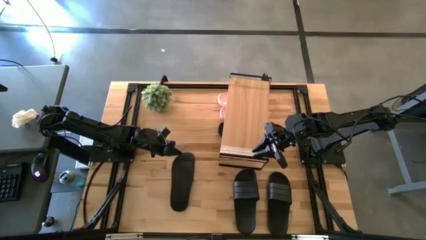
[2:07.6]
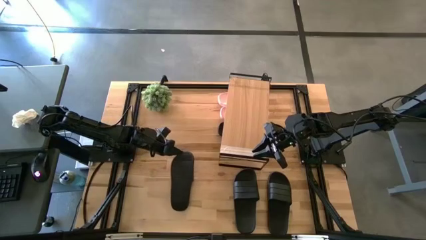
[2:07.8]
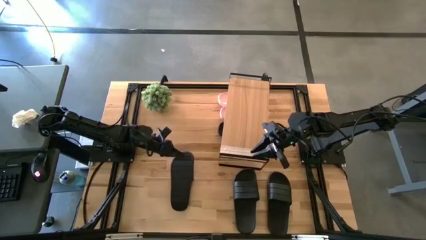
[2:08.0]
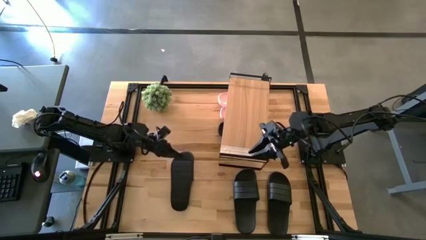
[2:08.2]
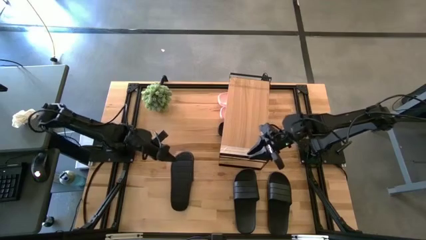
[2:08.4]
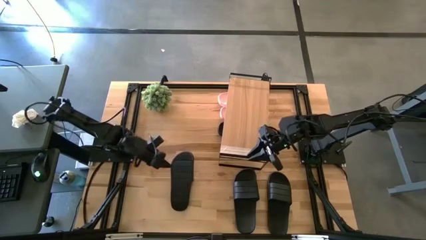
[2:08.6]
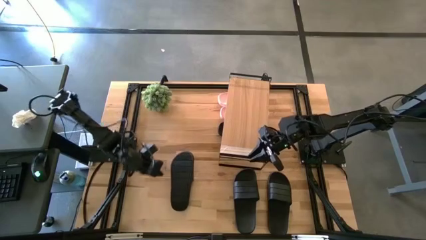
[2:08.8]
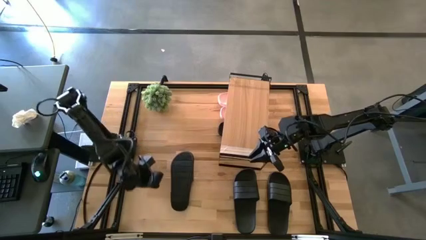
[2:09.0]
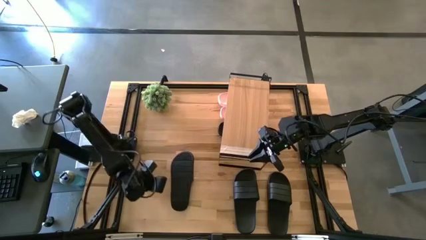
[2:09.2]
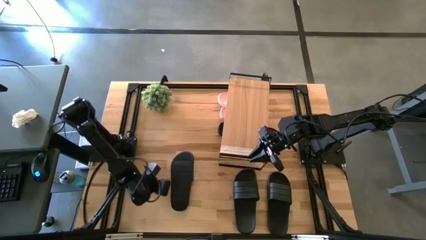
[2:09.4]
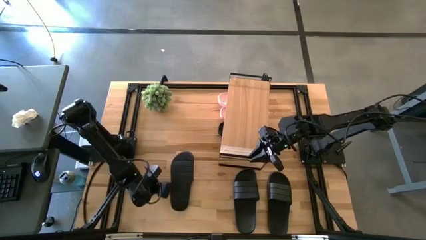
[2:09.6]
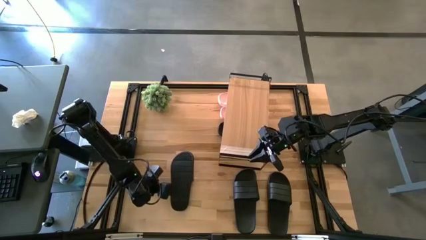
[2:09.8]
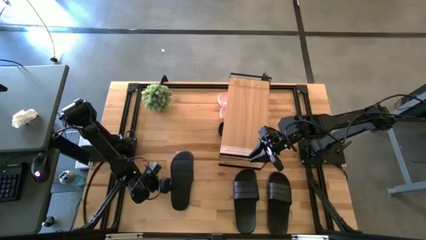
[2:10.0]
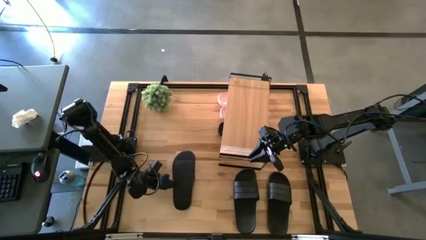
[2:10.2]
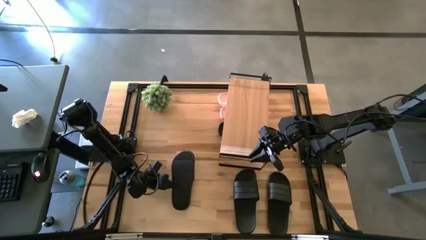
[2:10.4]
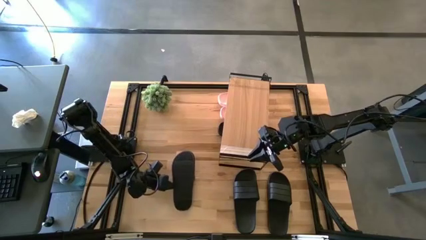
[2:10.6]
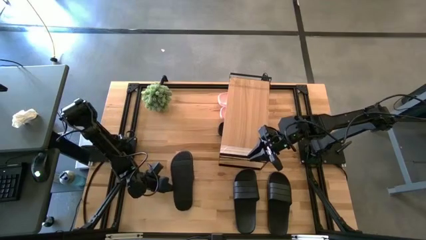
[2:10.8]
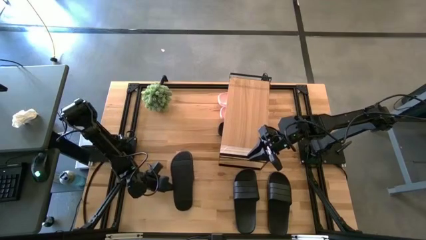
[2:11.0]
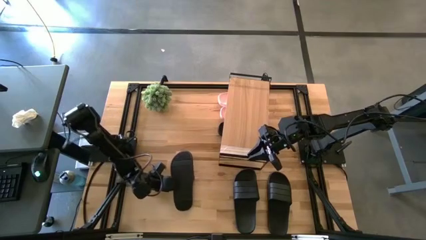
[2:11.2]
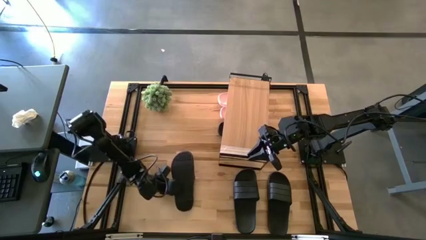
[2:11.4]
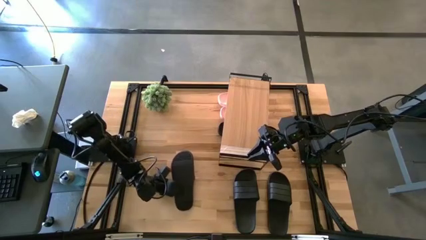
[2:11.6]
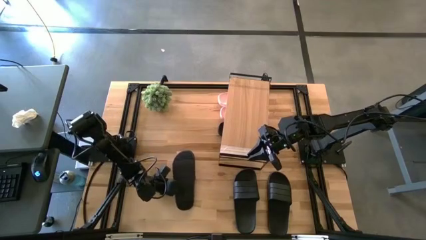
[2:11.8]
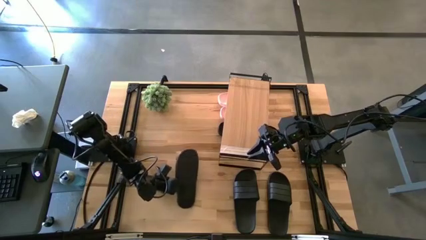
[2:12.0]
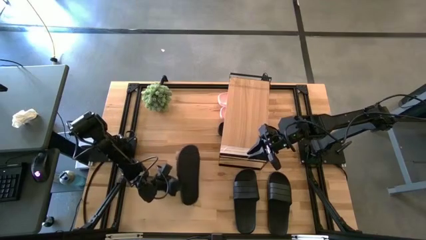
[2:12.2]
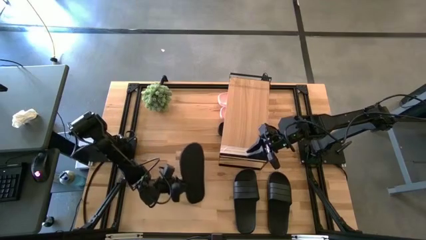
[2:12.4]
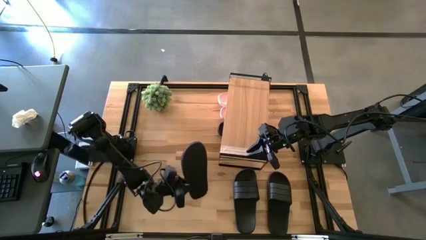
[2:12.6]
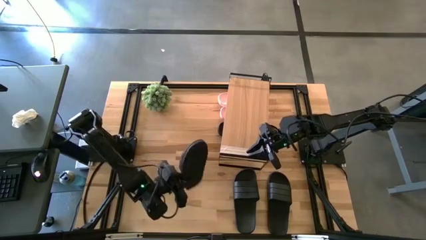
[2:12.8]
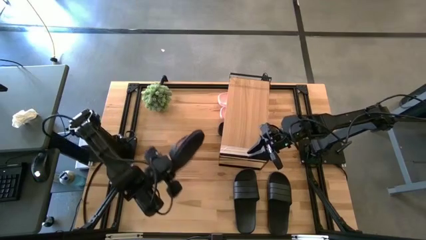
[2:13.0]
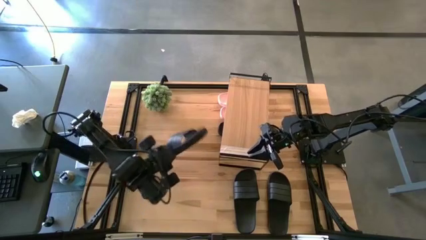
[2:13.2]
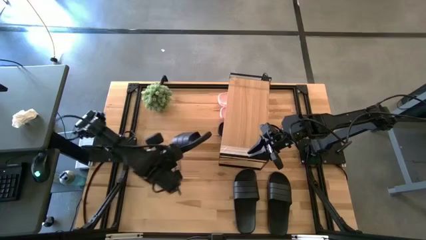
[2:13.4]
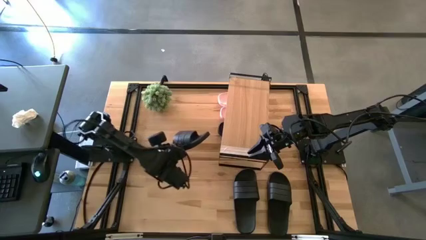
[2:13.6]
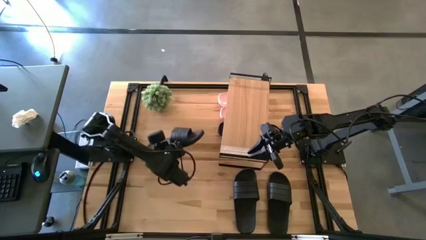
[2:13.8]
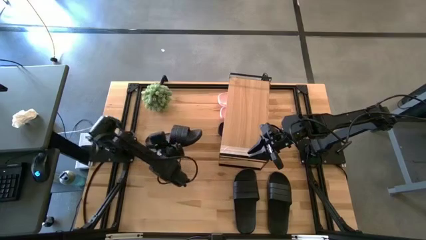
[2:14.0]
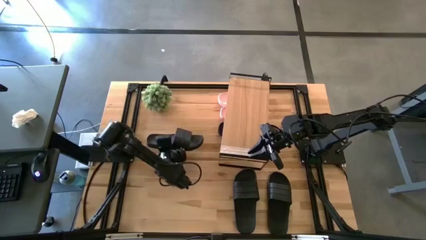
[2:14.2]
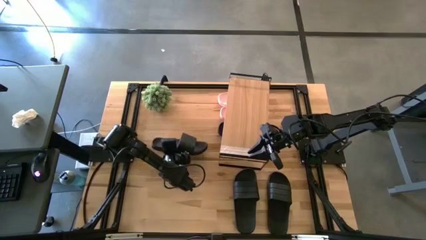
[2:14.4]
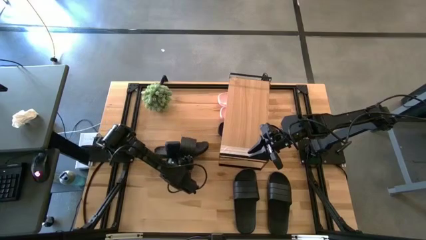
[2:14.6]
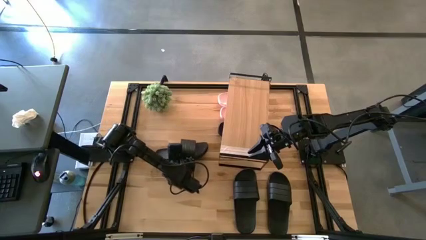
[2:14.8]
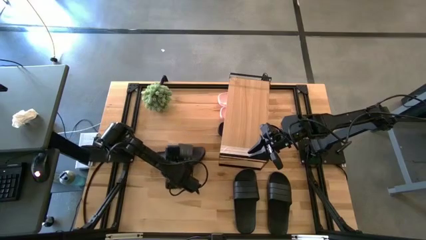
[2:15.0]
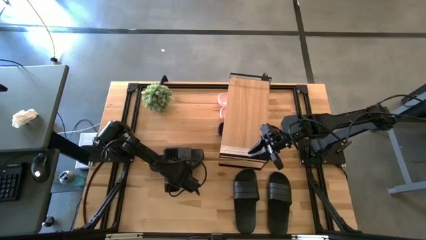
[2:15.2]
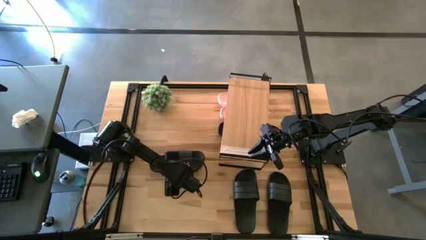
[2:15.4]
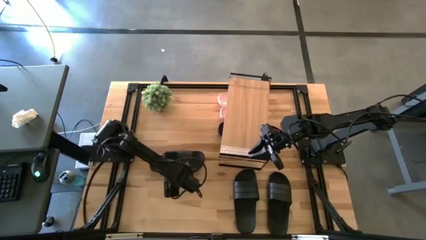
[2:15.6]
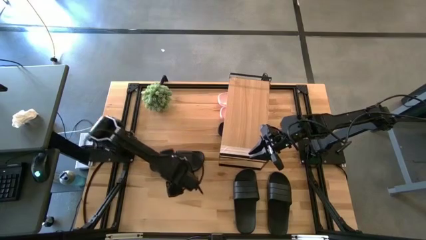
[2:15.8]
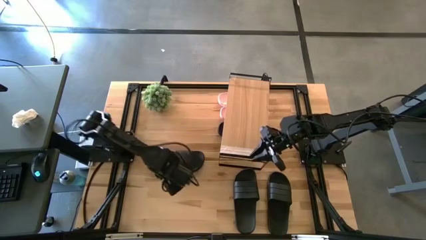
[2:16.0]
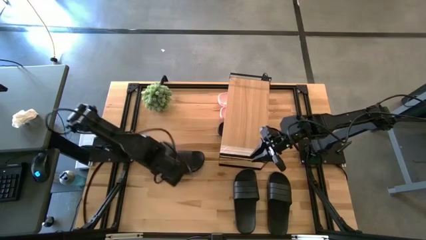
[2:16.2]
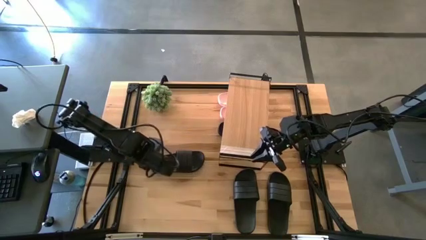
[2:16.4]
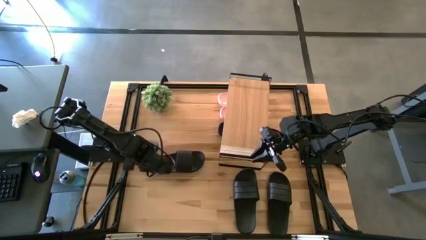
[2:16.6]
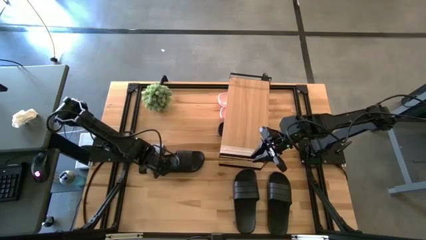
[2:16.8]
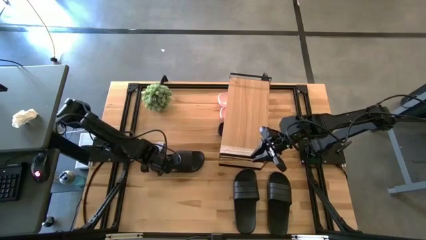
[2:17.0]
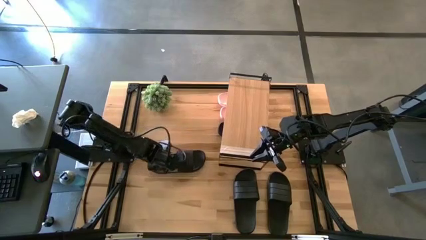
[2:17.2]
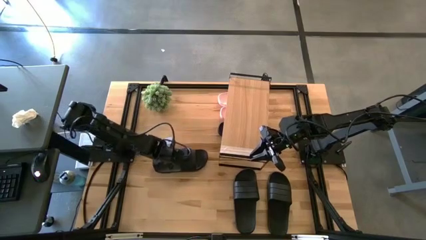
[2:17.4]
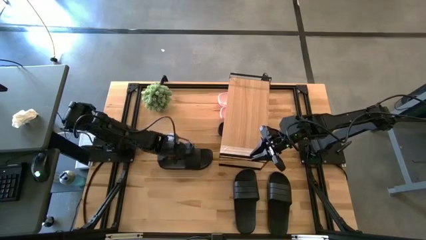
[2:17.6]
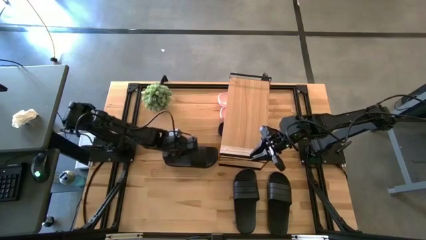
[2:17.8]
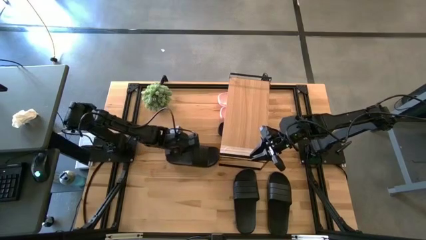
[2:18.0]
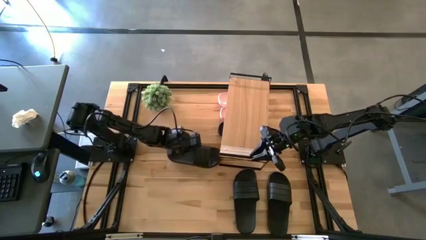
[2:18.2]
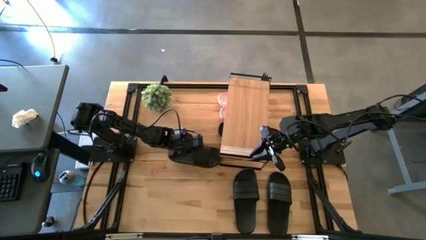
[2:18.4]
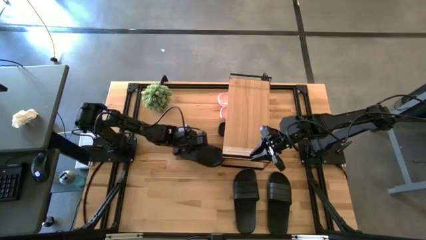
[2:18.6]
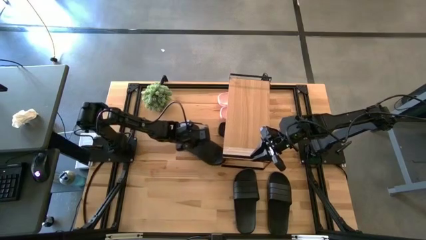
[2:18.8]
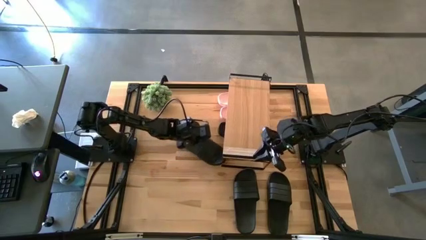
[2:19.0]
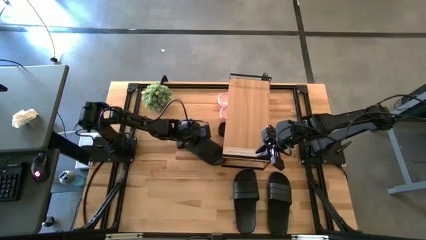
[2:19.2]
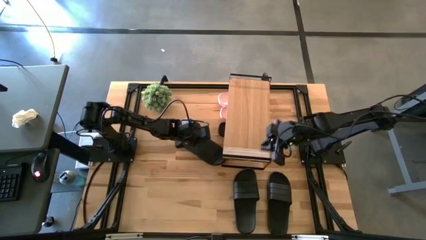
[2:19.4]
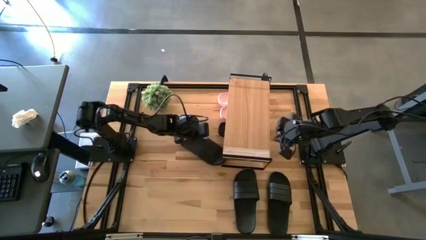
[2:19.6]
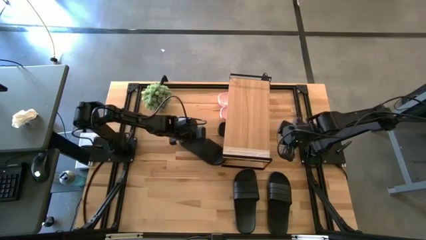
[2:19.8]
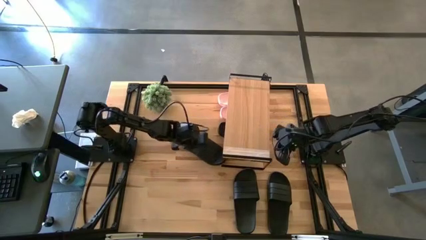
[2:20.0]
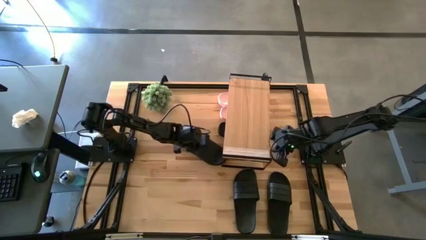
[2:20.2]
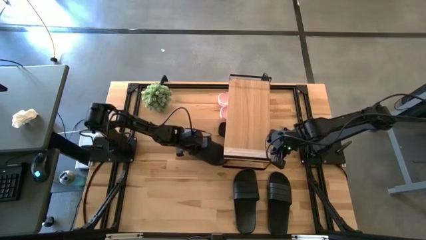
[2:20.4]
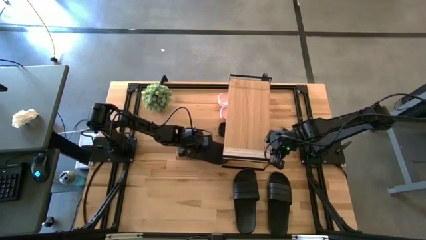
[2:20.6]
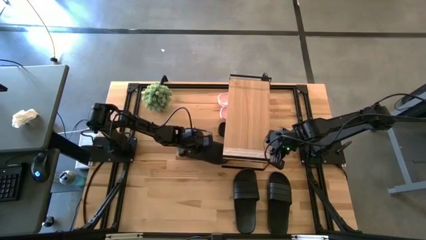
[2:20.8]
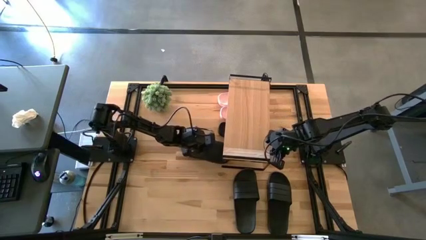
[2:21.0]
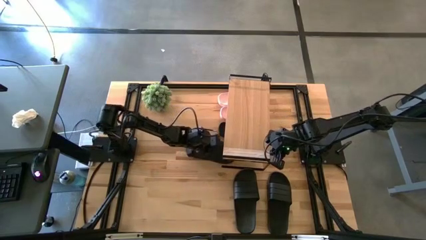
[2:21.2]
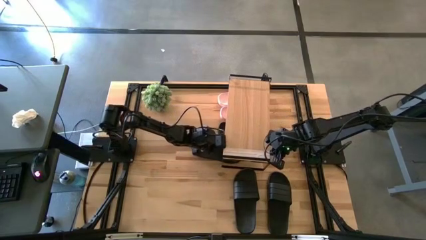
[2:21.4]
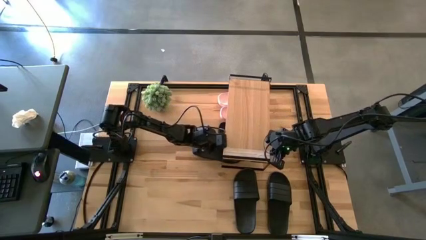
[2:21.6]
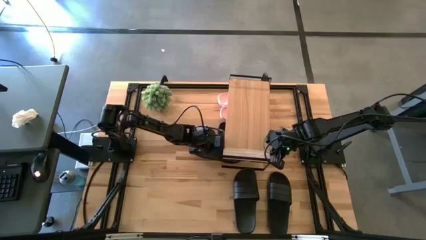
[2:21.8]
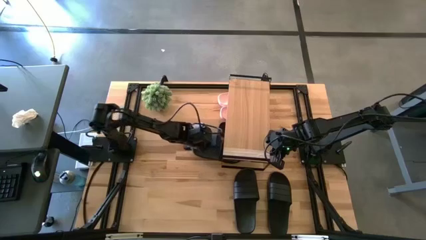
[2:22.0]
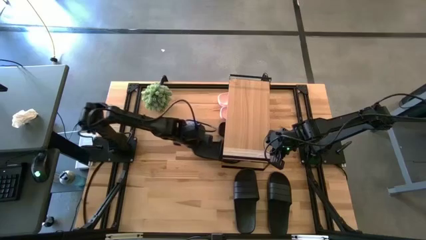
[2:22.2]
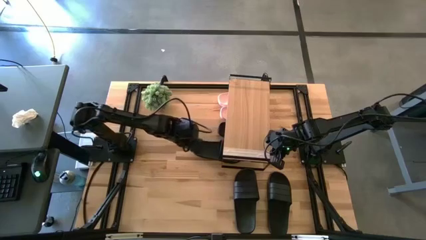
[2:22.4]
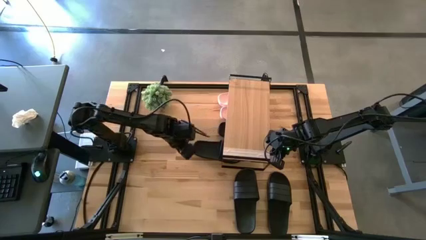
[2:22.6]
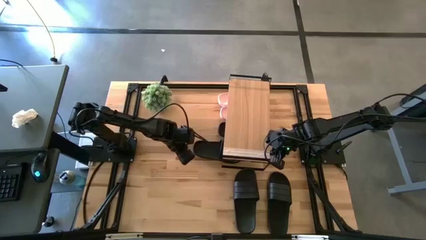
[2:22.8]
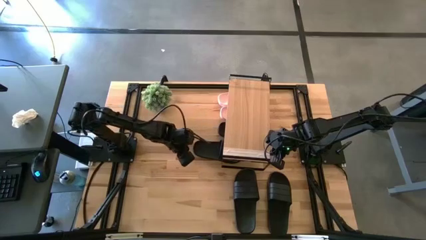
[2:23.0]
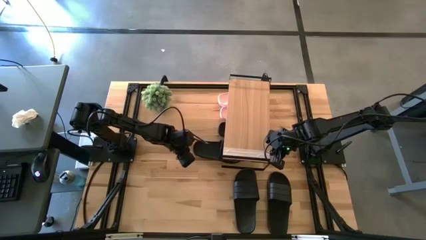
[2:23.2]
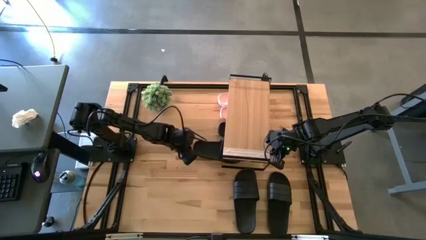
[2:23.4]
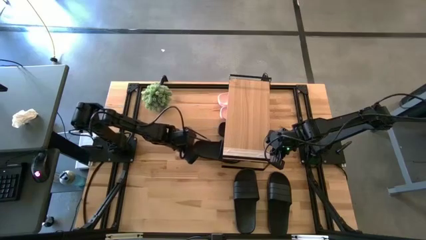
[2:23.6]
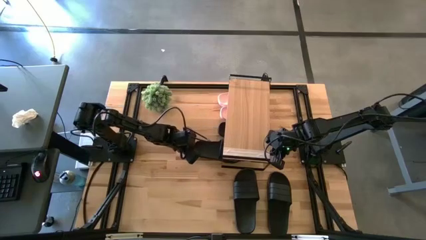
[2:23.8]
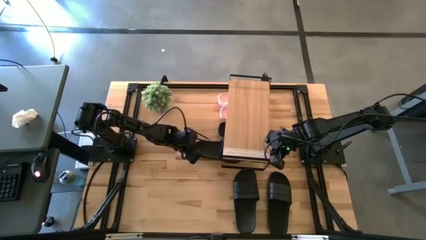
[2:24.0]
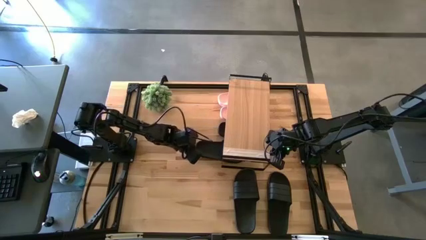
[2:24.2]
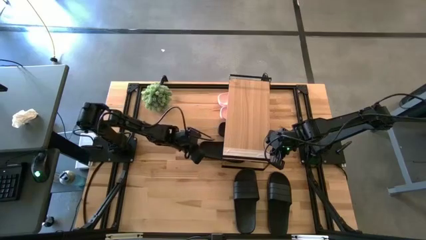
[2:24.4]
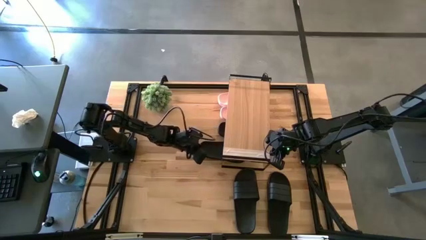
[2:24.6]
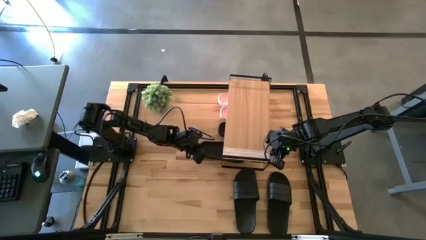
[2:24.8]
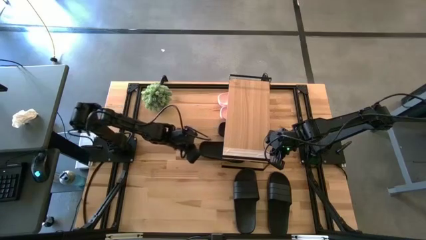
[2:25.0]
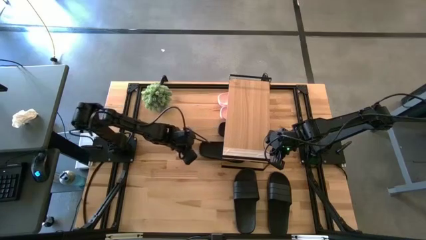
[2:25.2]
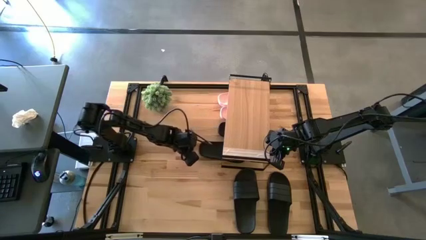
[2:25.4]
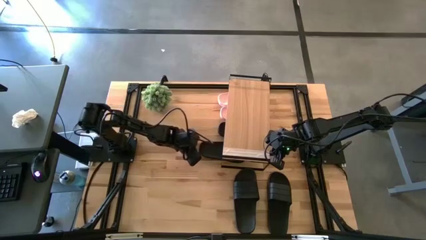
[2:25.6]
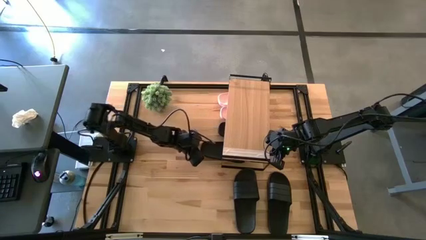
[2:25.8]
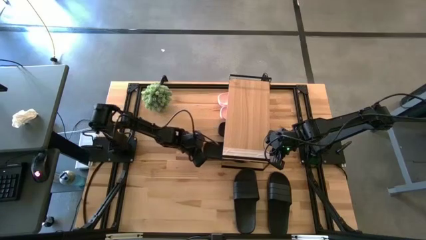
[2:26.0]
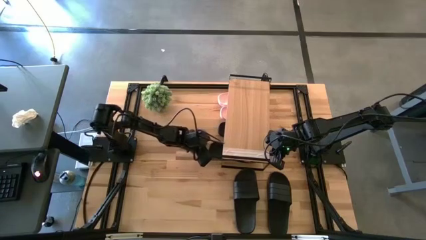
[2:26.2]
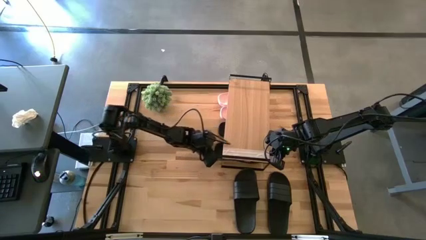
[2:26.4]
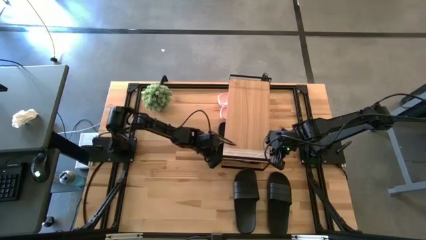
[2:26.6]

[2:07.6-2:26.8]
Task: Pick and place slides into the shelf
Put the black slipper under the shelf
